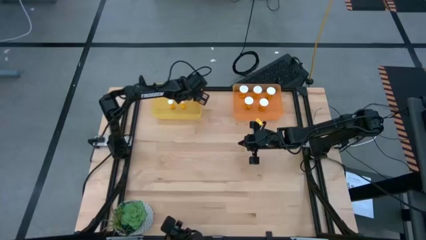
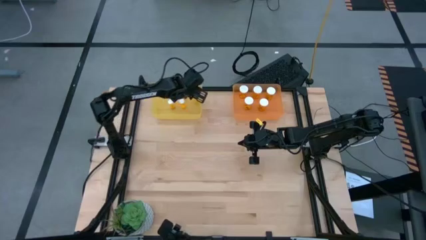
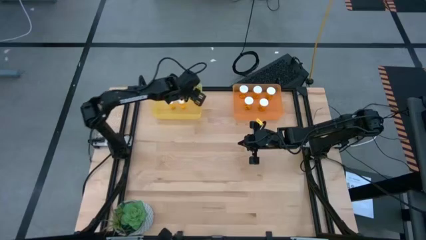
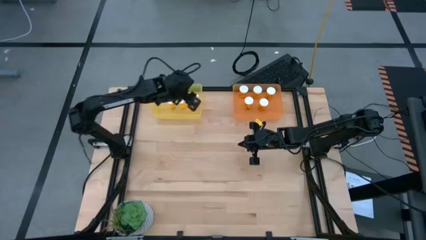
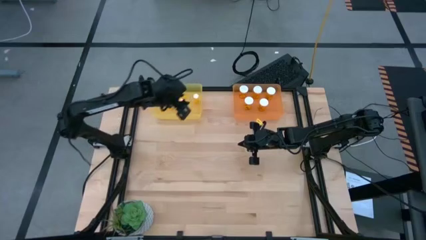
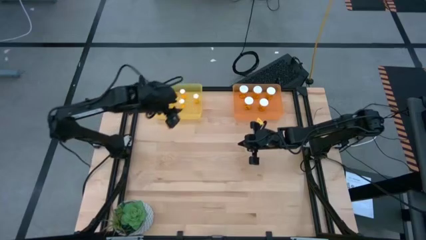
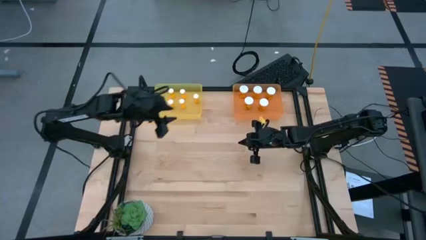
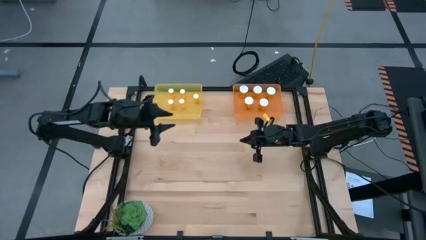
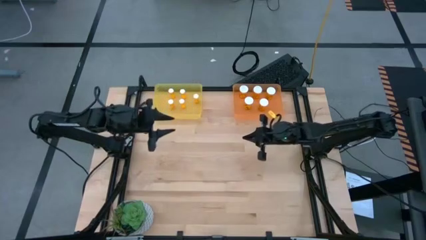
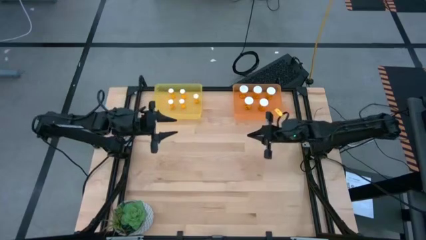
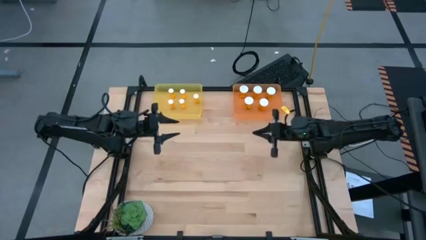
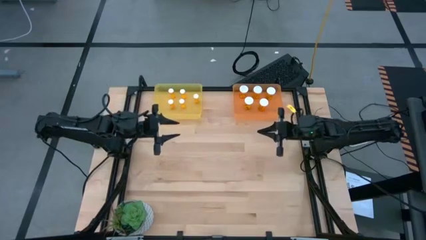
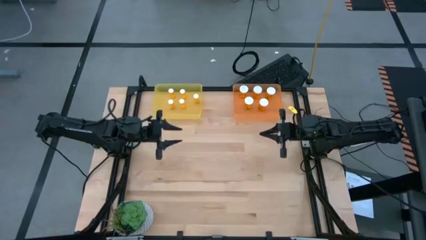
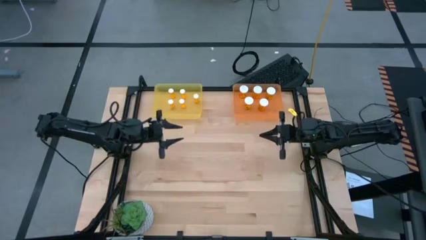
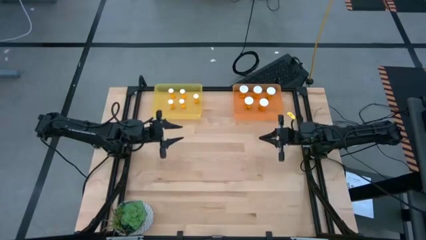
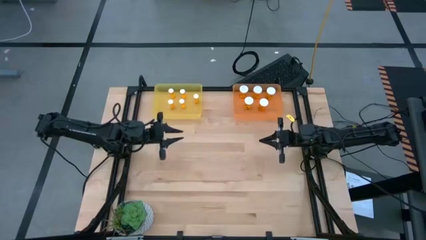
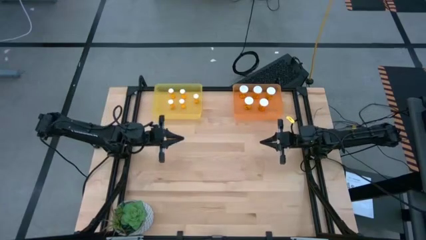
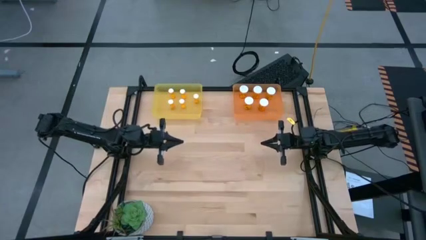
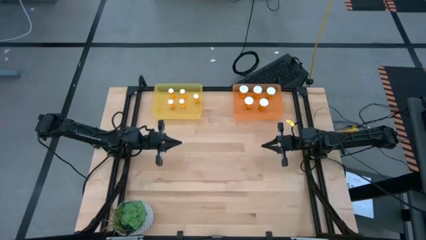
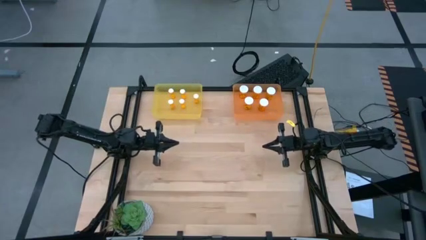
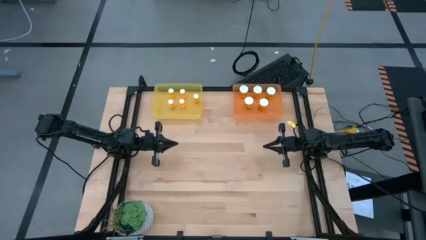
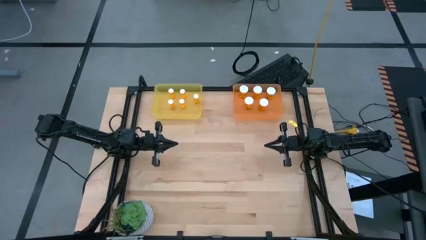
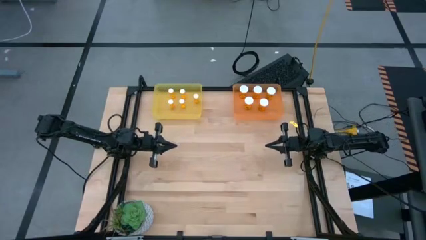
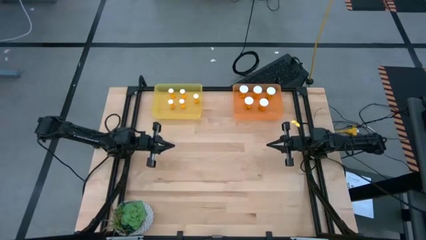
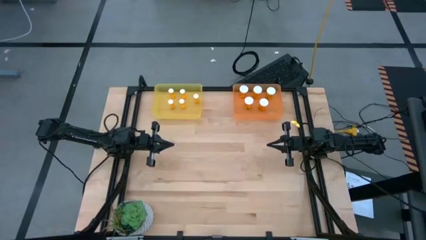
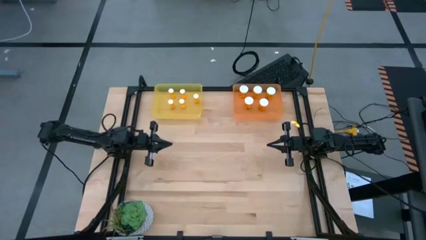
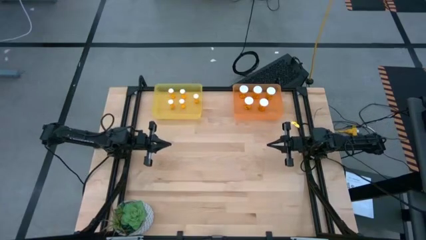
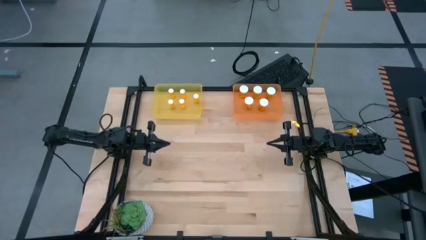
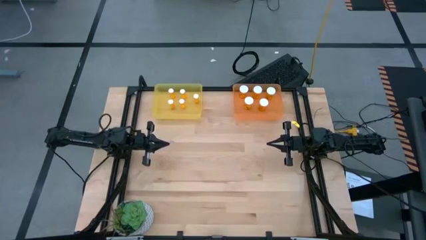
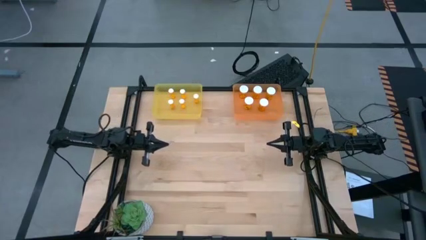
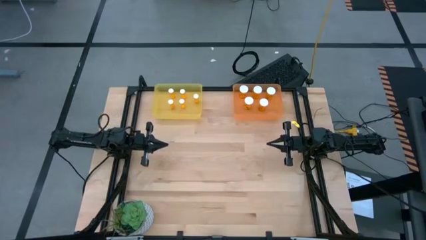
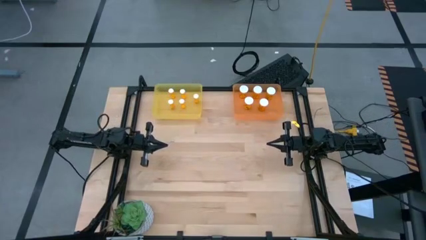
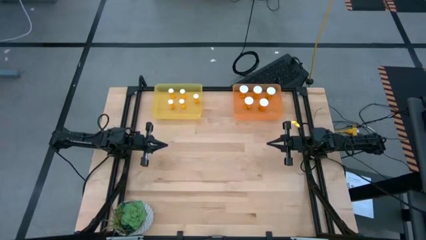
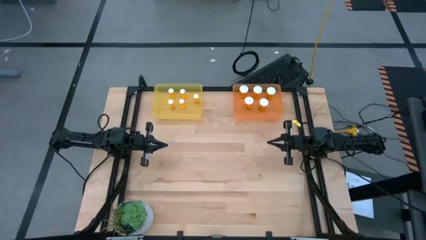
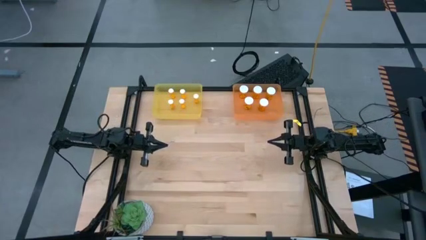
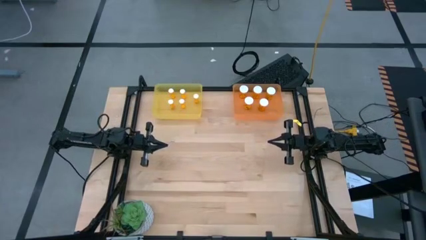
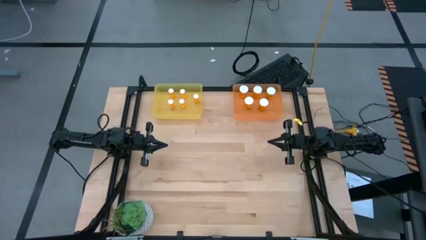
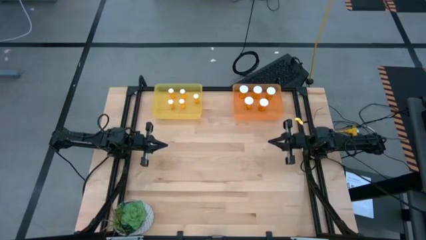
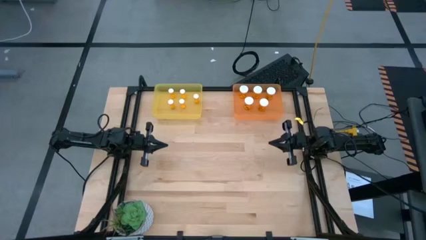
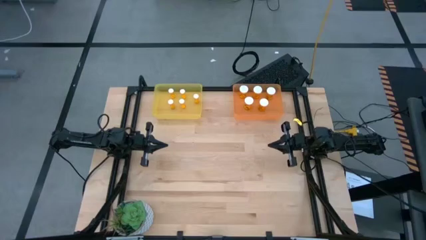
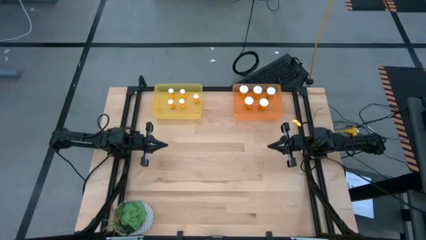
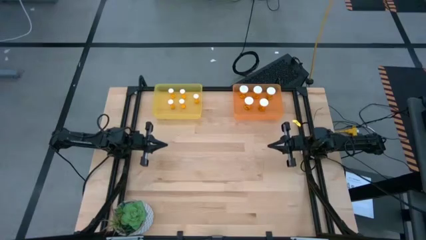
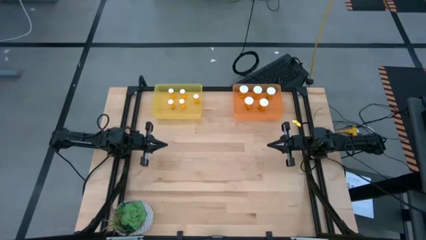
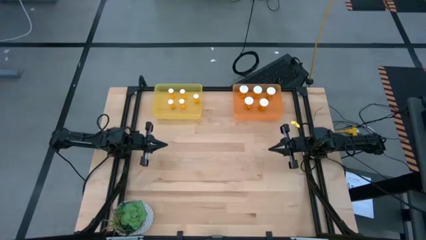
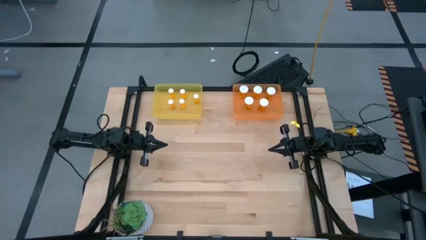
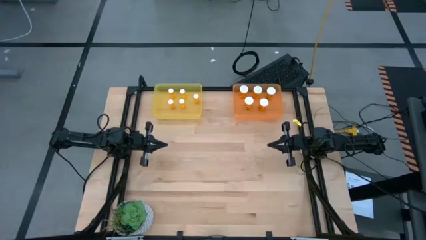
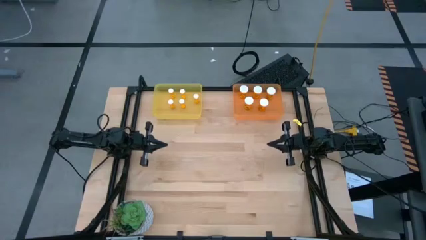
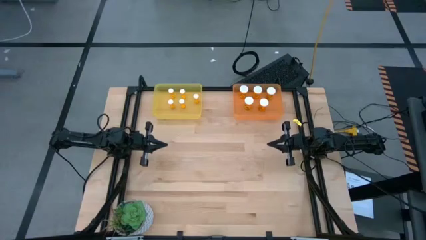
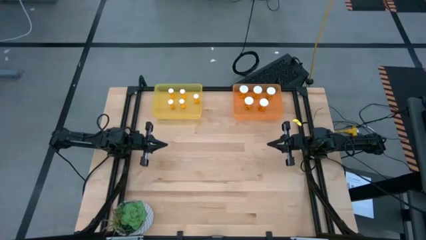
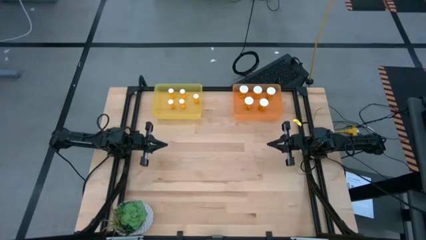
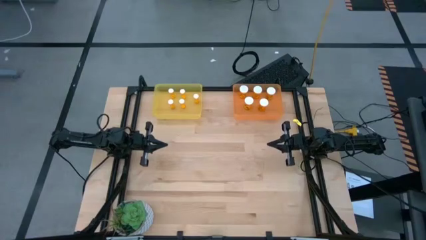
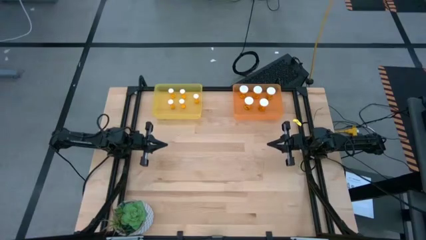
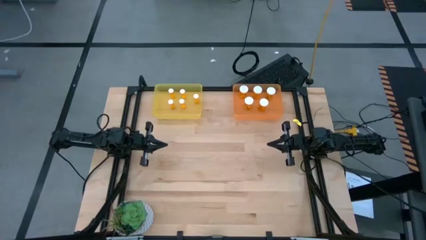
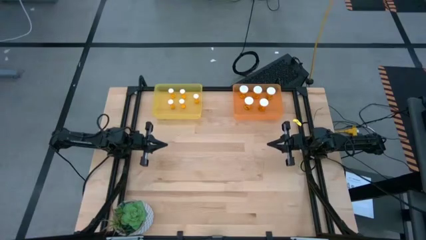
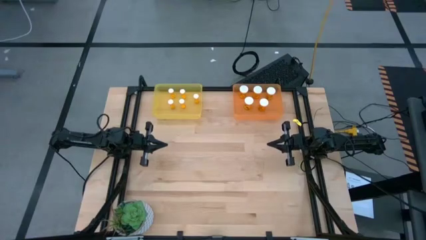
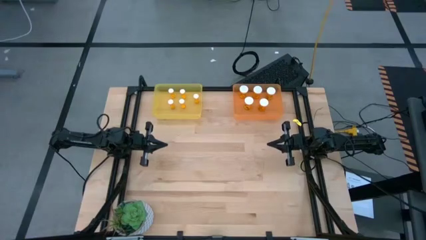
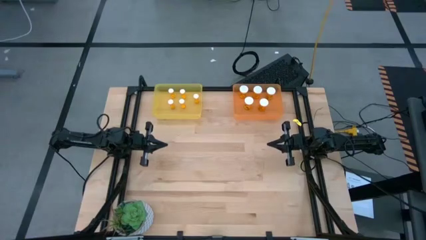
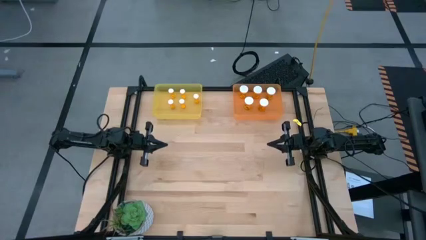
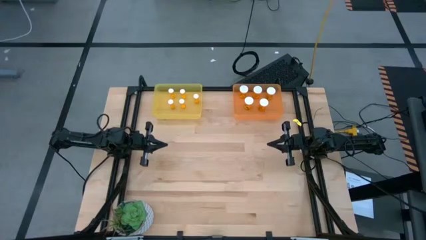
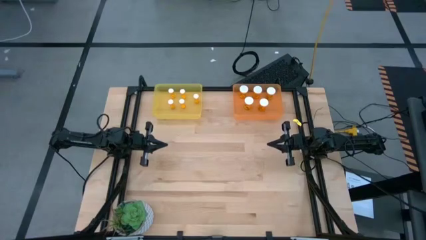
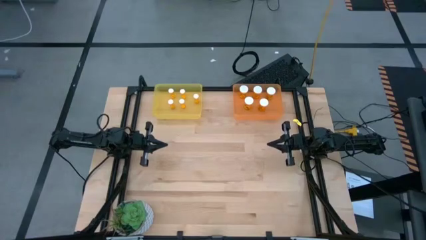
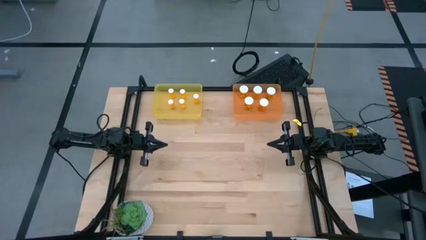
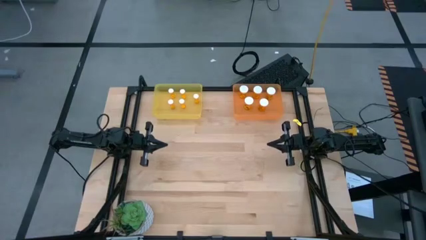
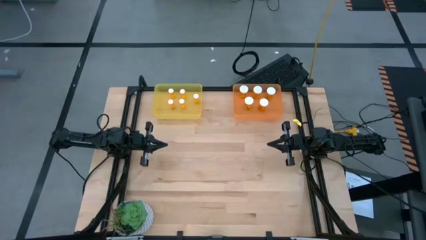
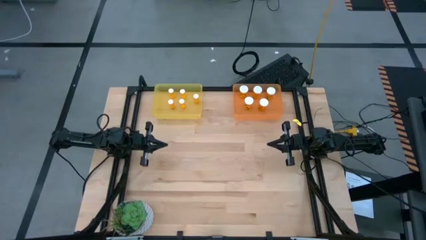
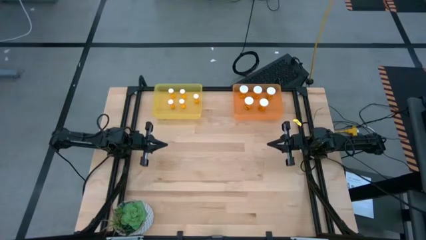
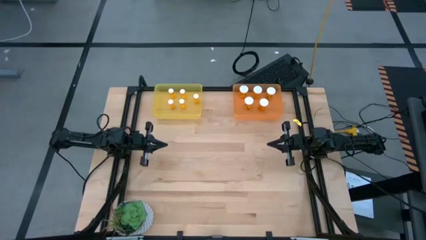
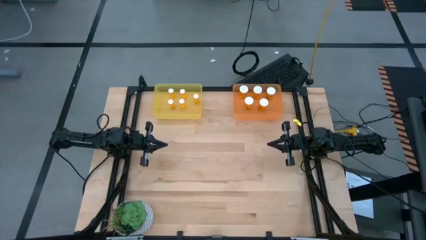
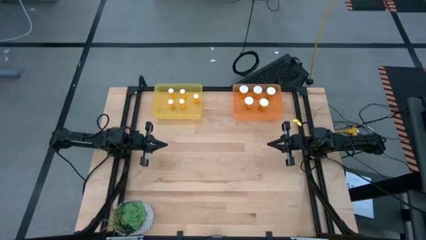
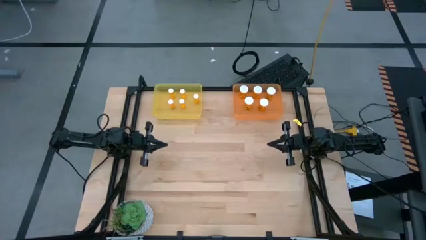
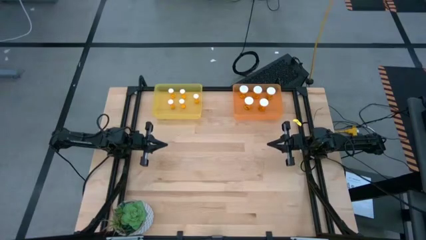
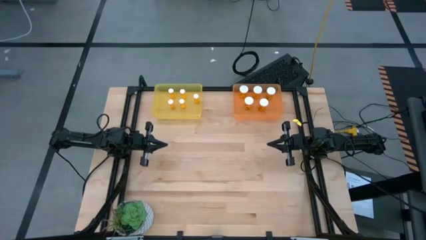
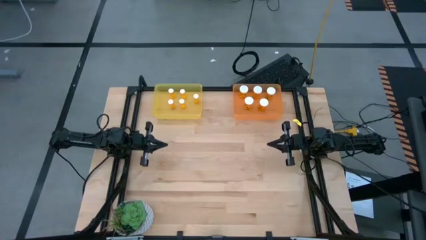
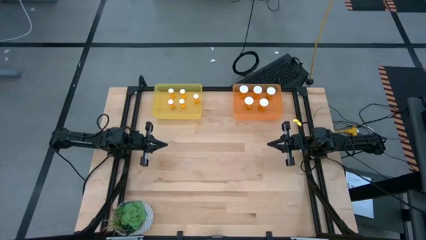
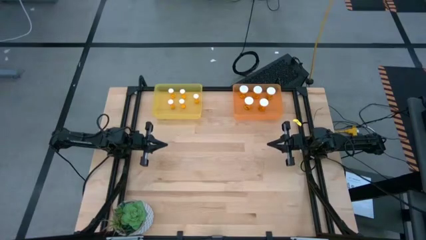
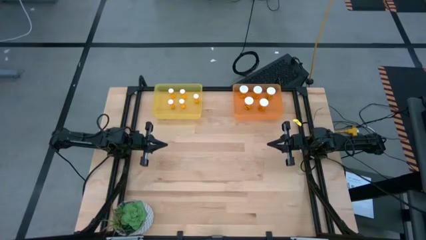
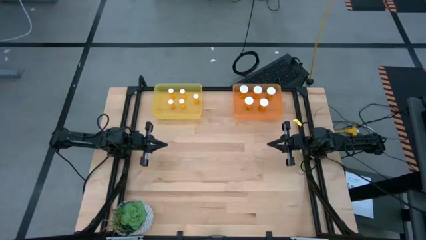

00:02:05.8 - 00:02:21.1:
Task: Pick and place medicine bottles into bin by pill shape (circle, oval)
Return to Home Position
